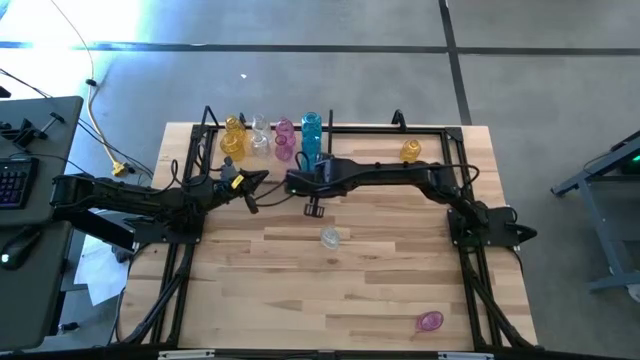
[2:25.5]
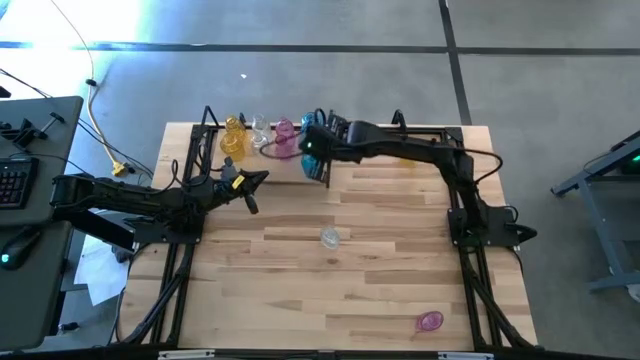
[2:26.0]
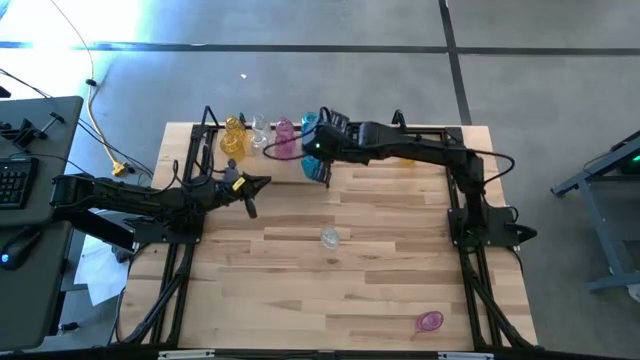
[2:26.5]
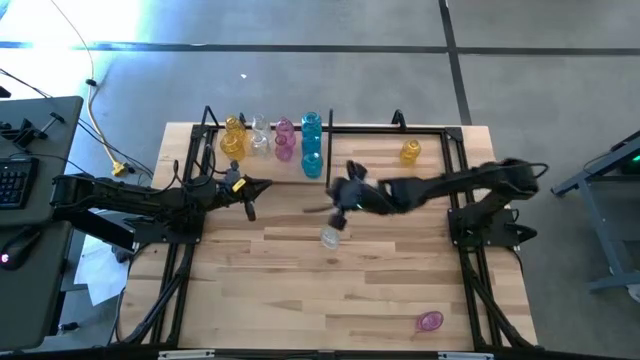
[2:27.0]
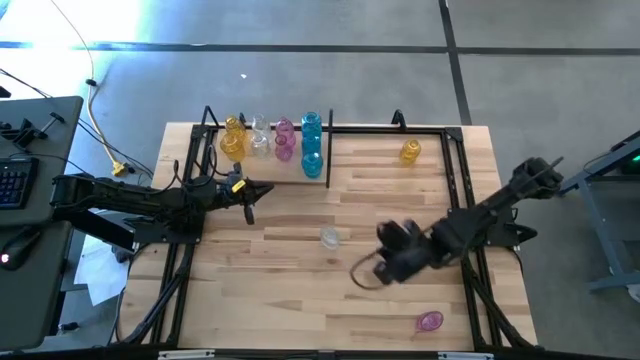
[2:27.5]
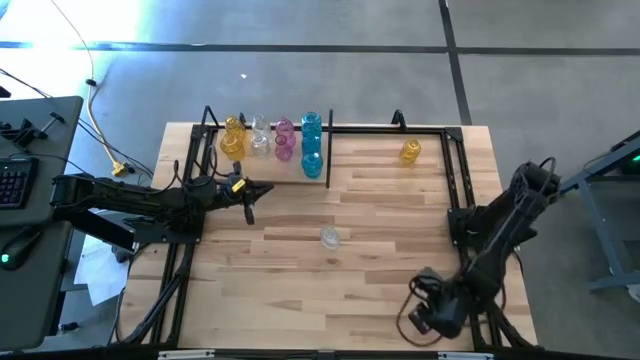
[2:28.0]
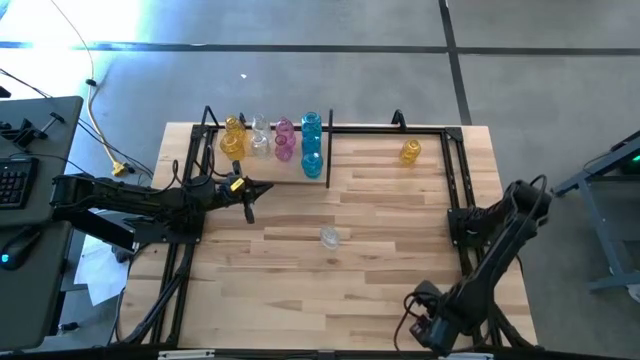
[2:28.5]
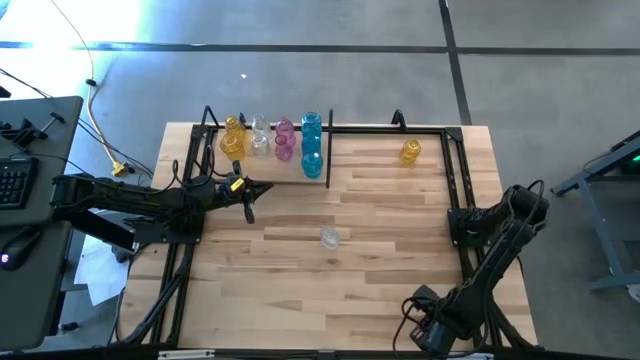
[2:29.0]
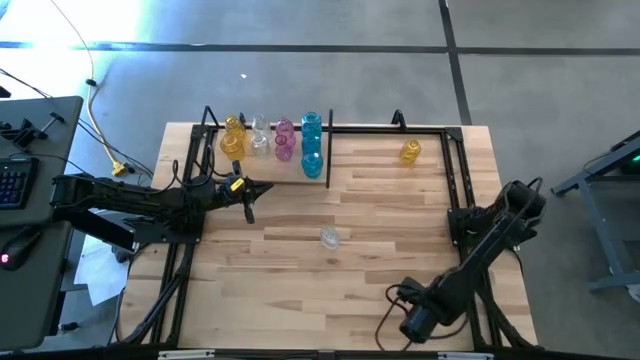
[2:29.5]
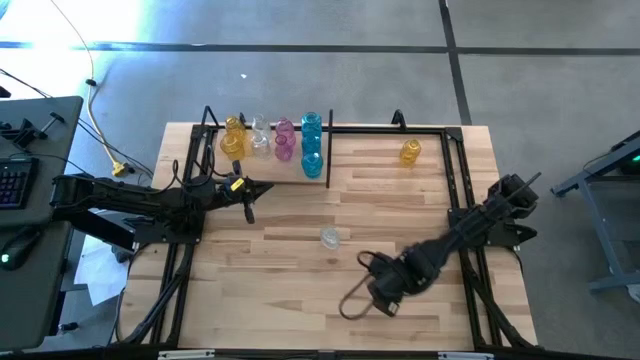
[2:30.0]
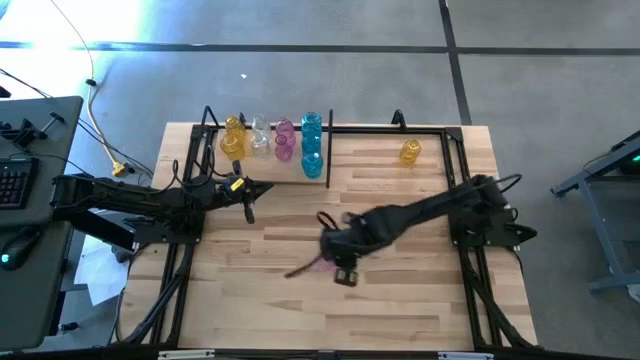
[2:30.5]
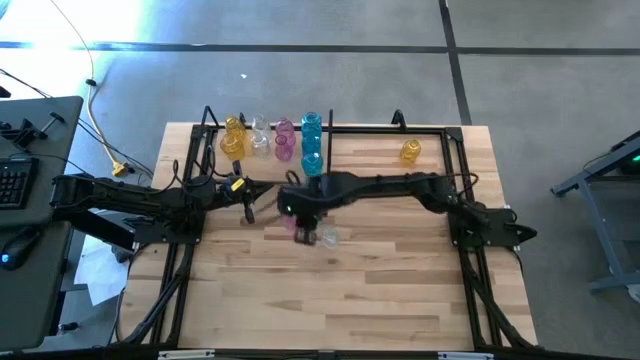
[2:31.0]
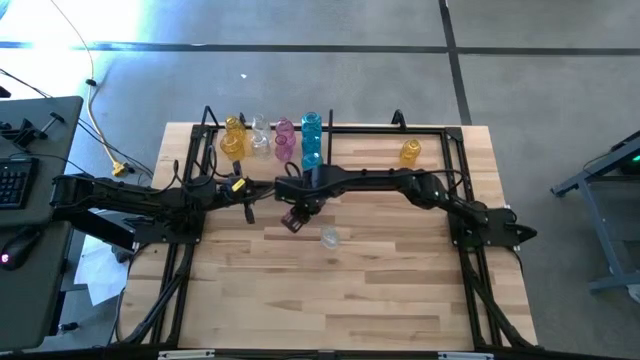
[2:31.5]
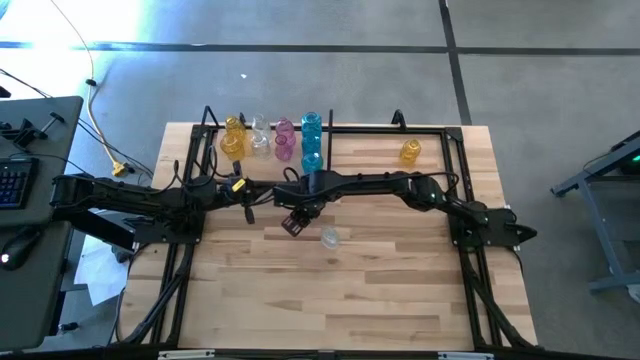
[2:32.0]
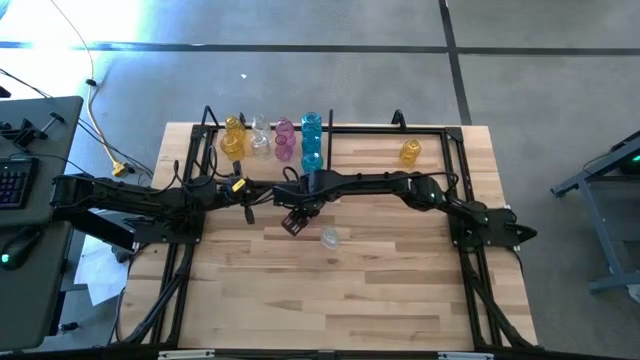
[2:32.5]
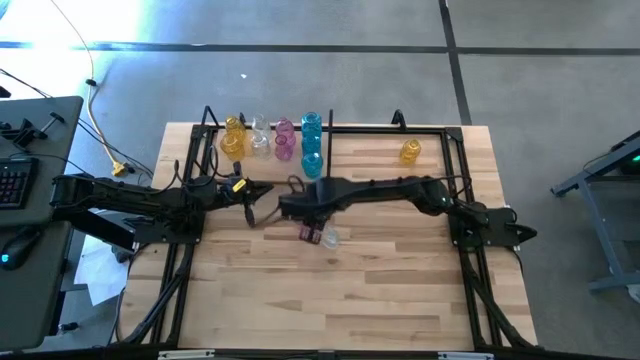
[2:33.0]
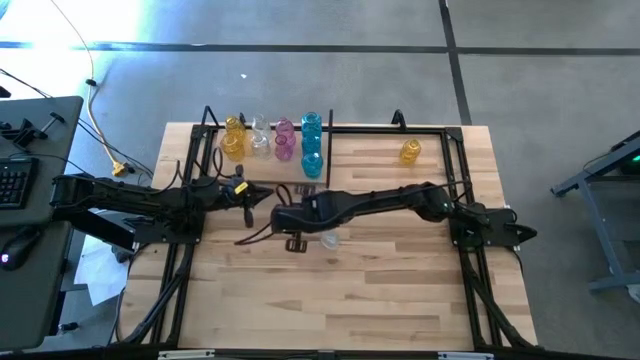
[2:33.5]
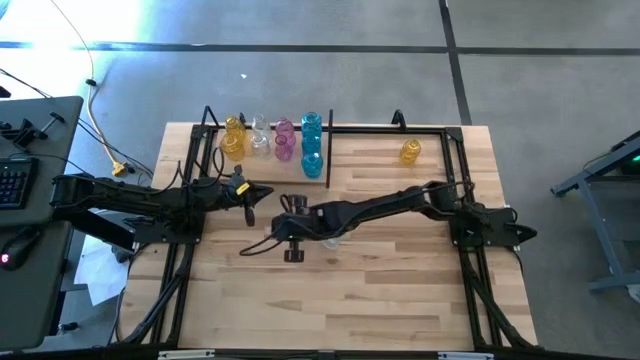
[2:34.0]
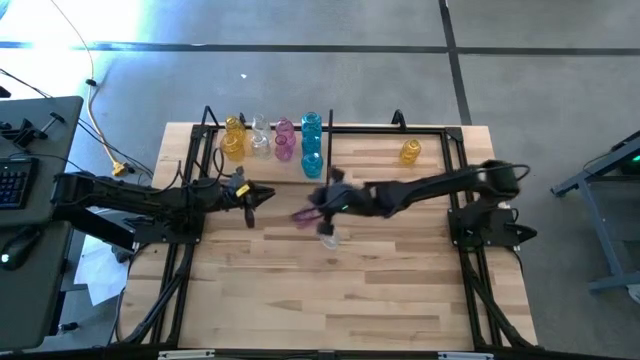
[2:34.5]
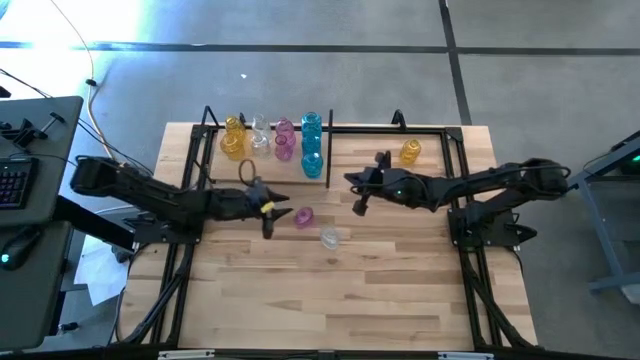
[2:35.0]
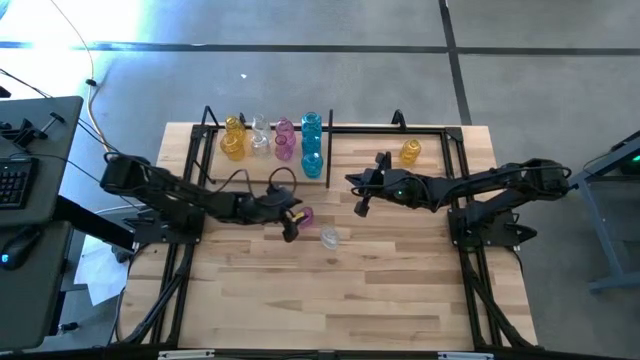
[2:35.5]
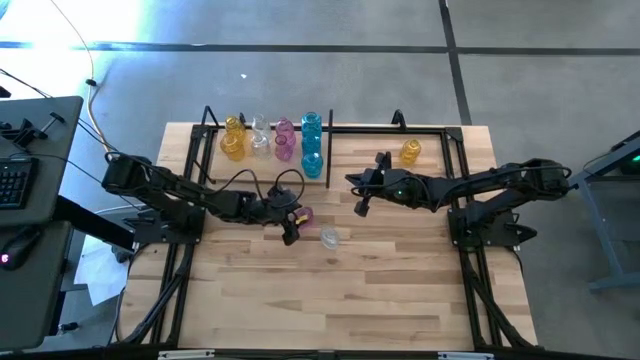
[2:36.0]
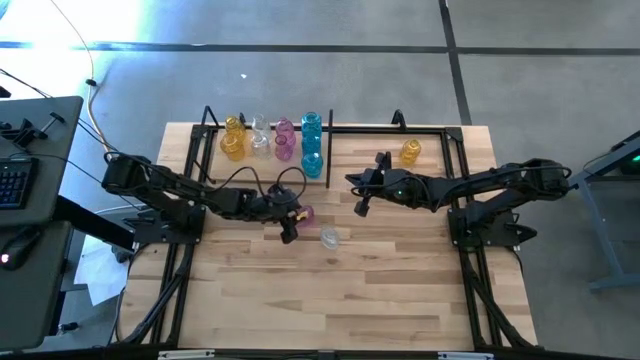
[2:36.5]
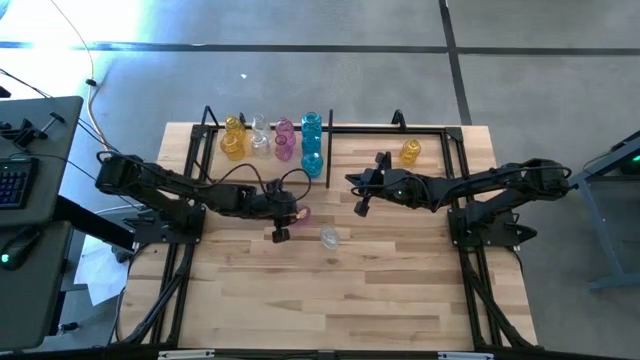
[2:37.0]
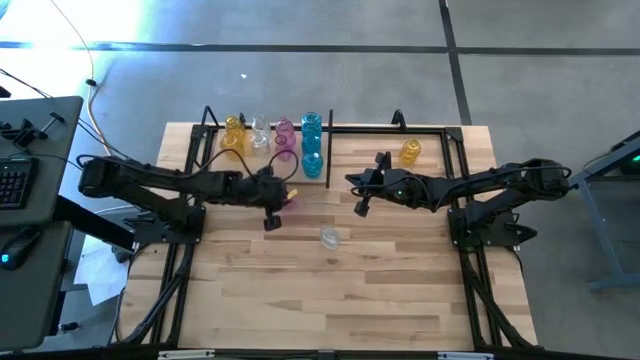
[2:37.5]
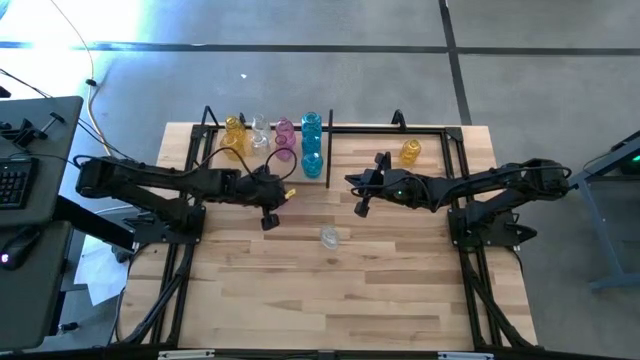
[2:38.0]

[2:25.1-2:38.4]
Task: sort vases onto shelf
Put the purple flower vase aligned with the other purple flower vase on the shelf

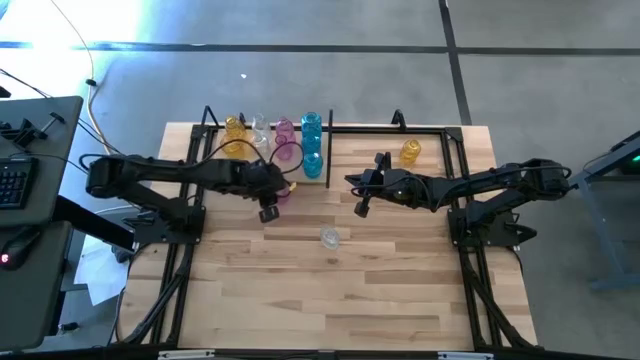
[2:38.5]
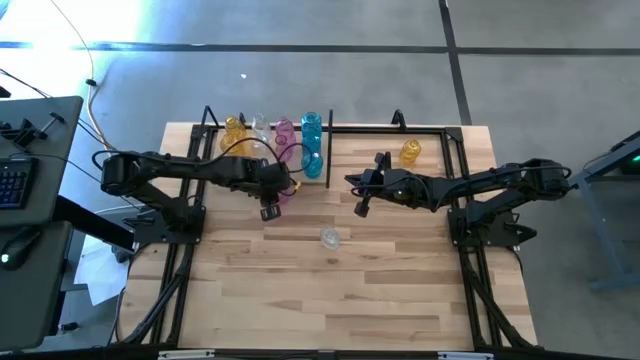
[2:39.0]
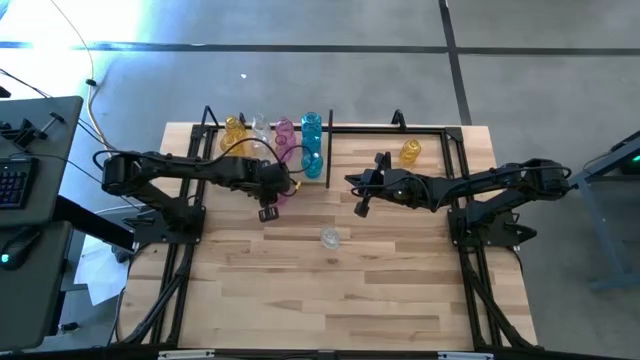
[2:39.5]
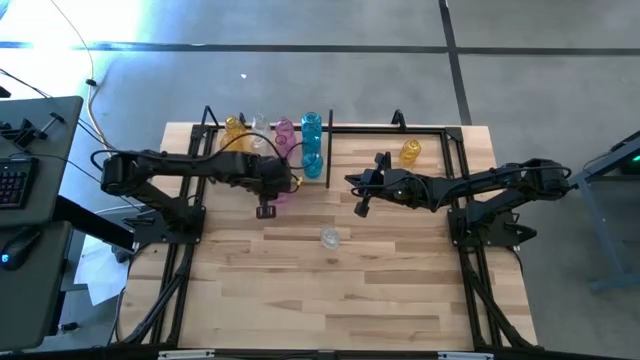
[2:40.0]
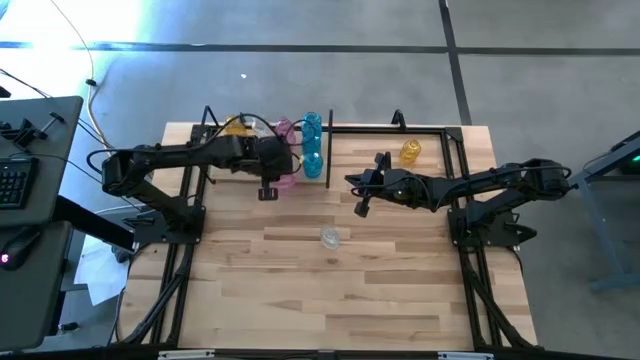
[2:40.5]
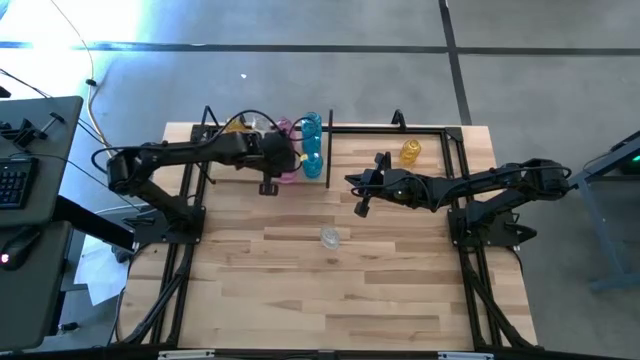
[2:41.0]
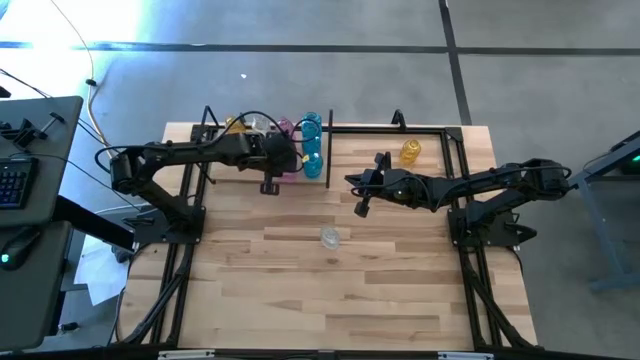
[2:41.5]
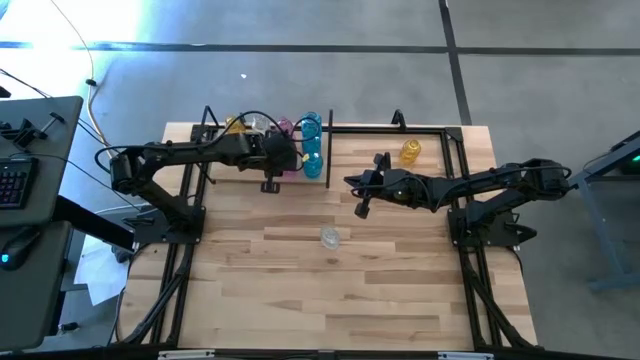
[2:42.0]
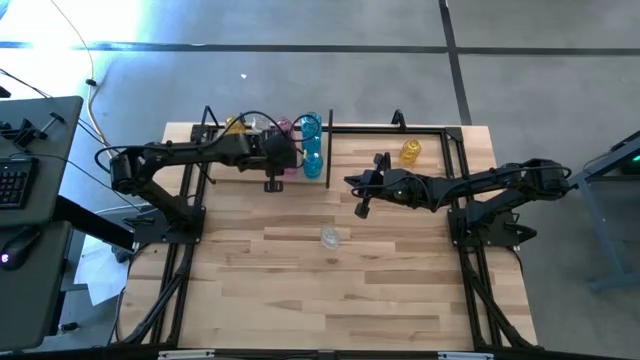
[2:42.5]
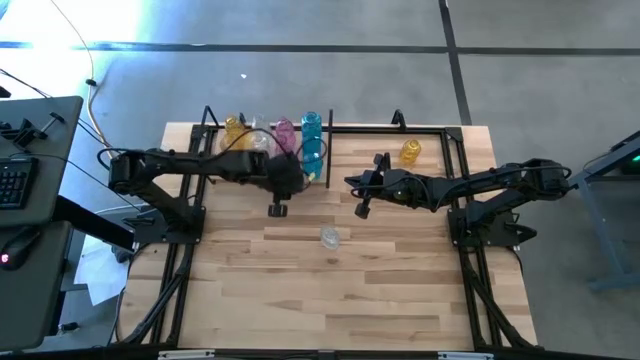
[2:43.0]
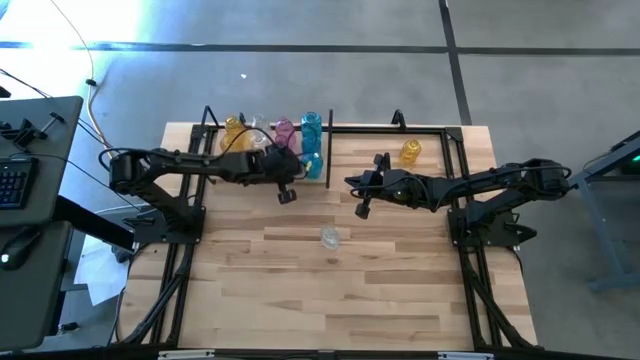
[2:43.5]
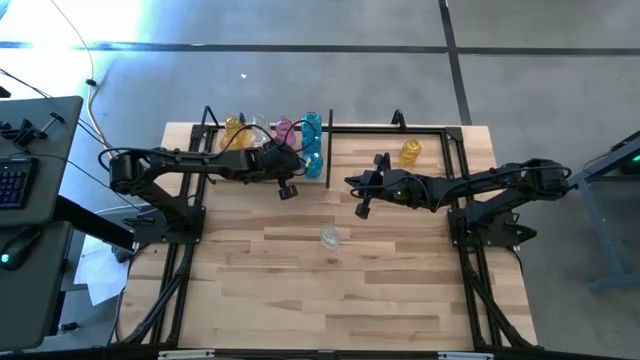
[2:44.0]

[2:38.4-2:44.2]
Put the purple flower vase aligned with the other purple flower vase on the shelf

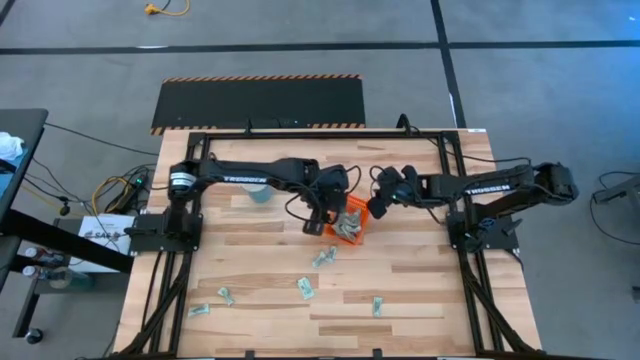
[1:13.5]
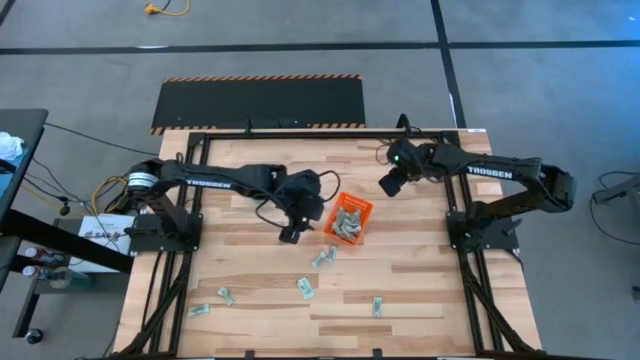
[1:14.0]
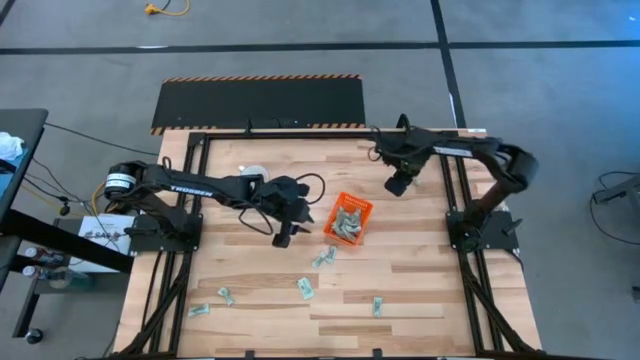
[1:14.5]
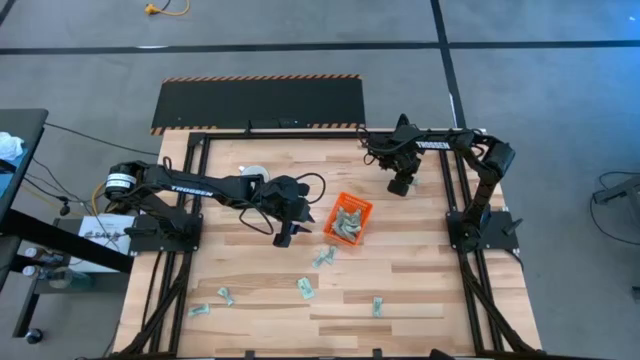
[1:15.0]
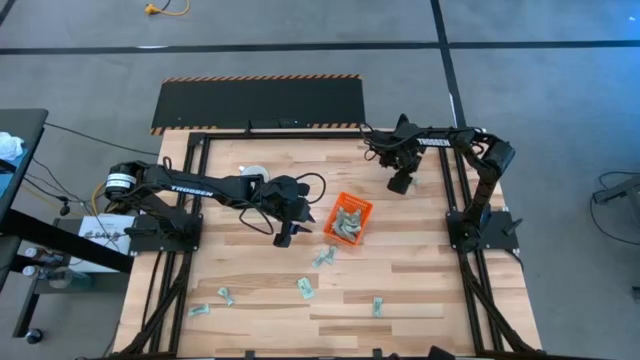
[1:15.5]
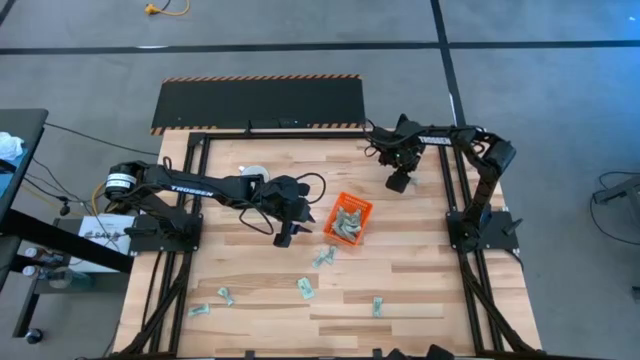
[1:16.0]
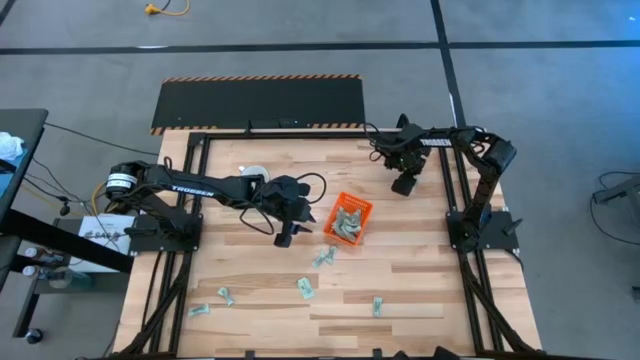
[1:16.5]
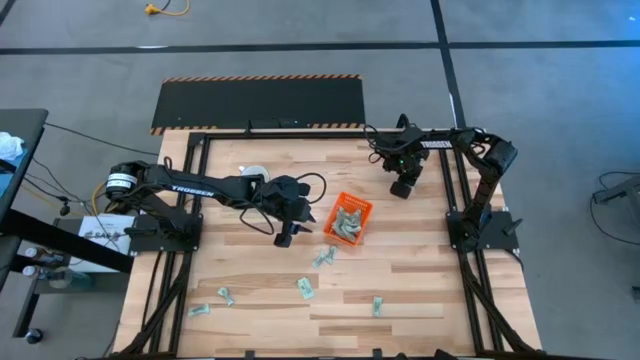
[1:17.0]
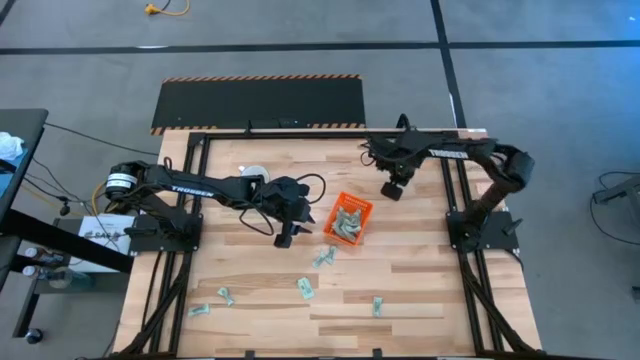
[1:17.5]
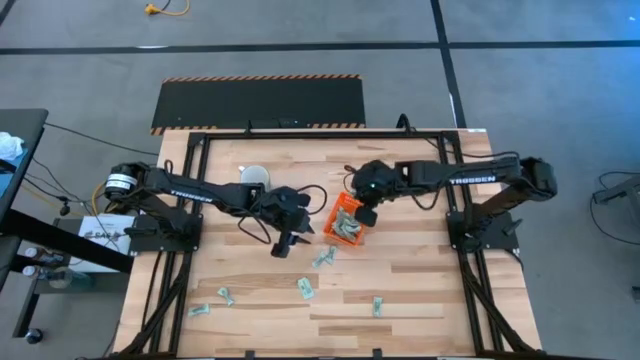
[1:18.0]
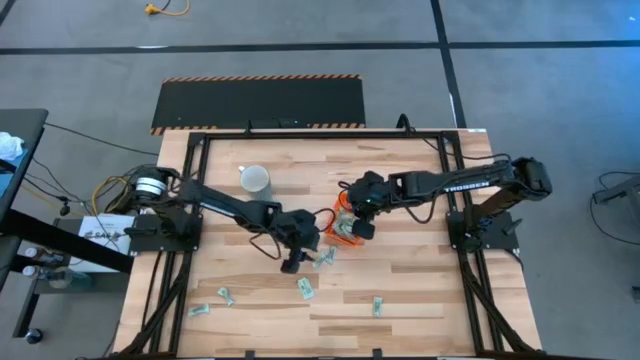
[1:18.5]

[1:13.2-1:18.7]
Task: Pick and place Stevia / Truvia into bins
Put the stevia packet into the basket
